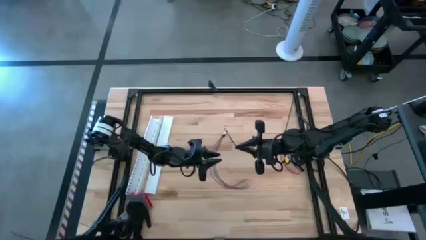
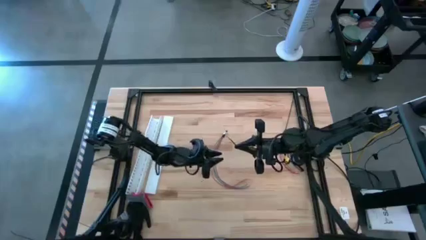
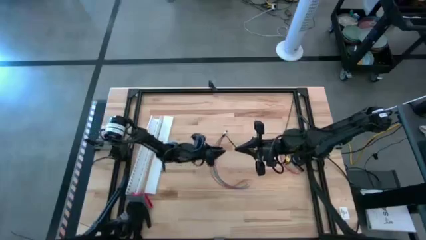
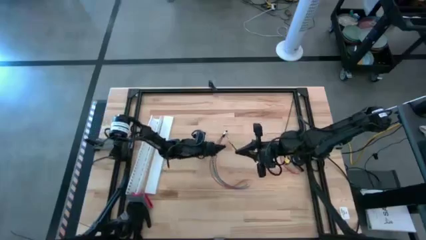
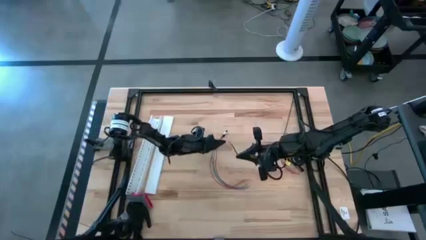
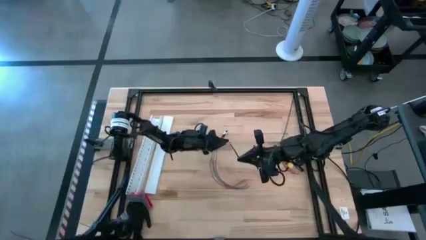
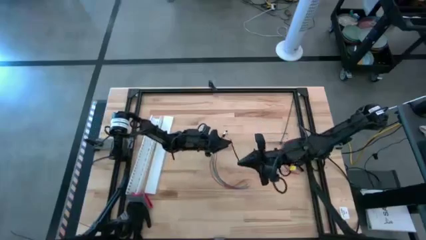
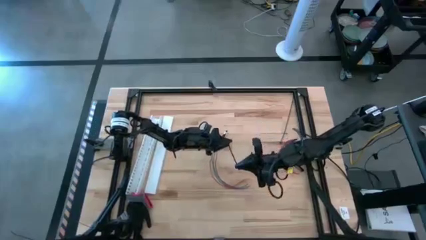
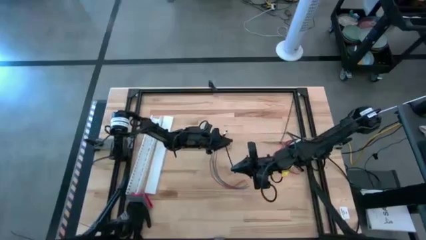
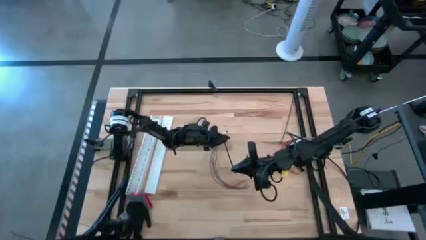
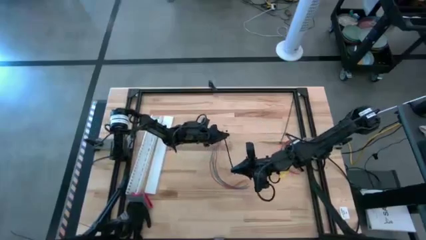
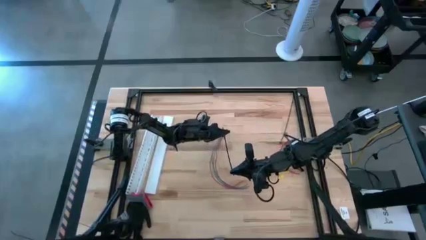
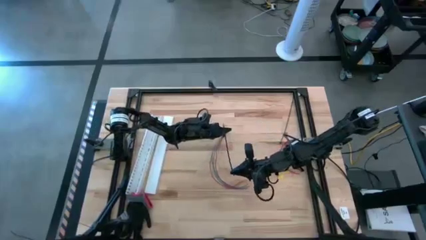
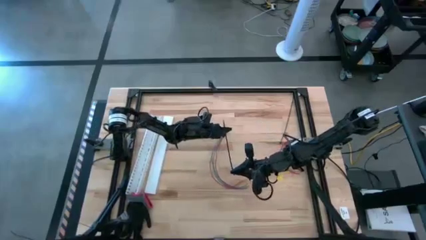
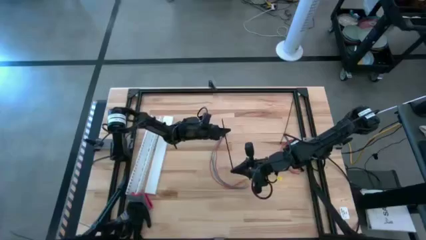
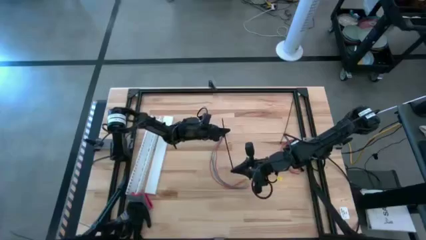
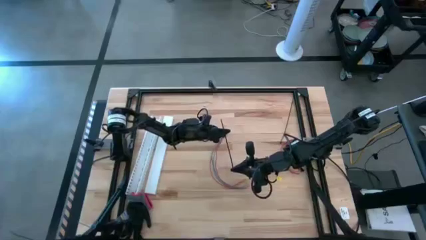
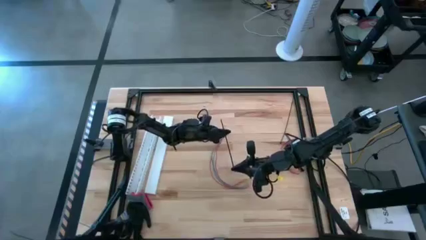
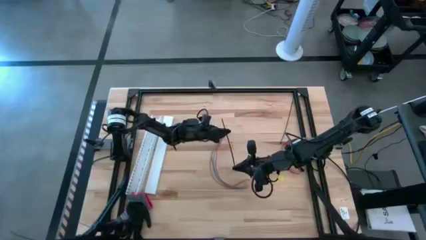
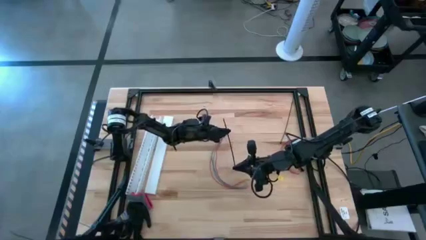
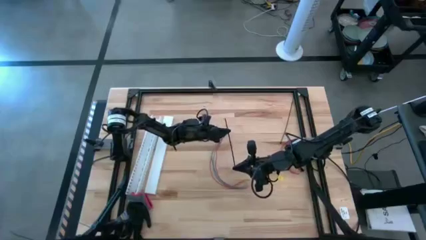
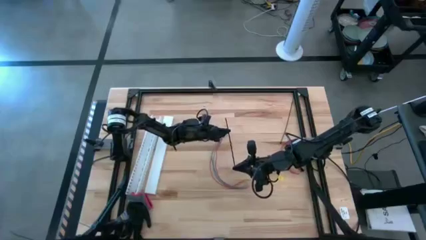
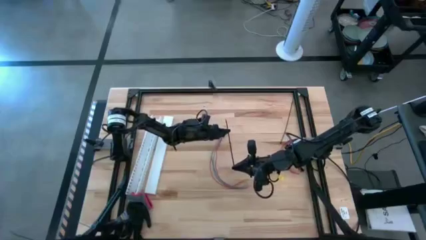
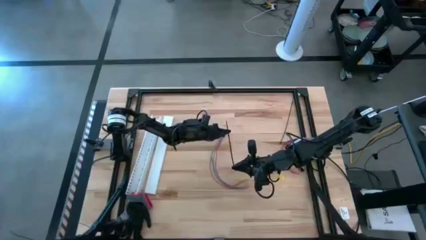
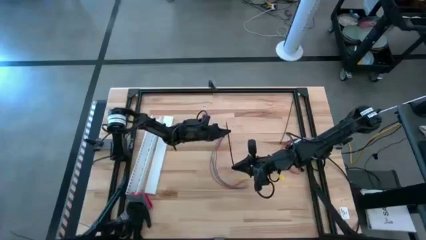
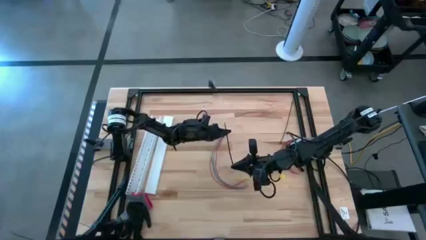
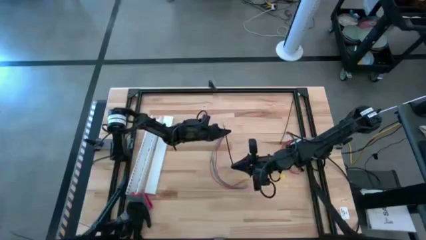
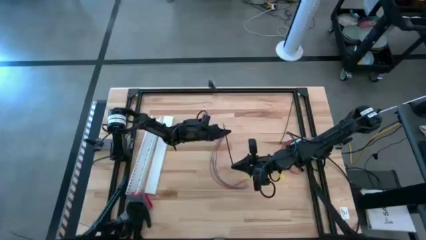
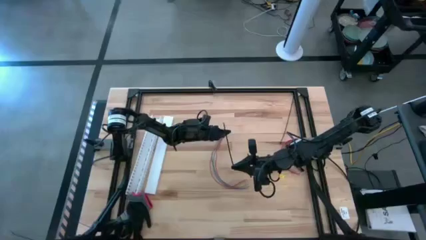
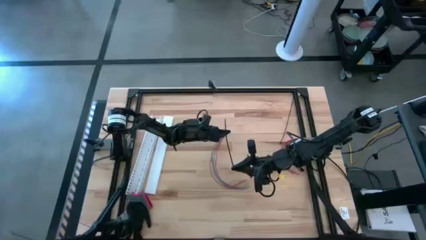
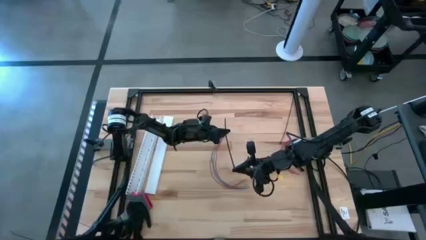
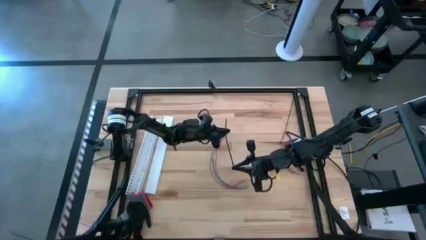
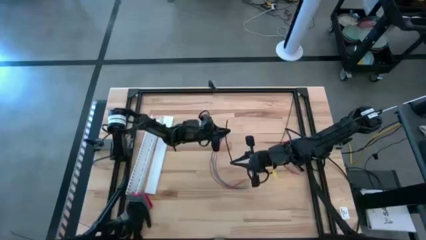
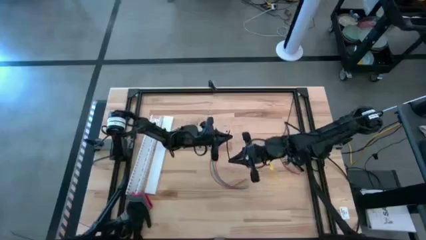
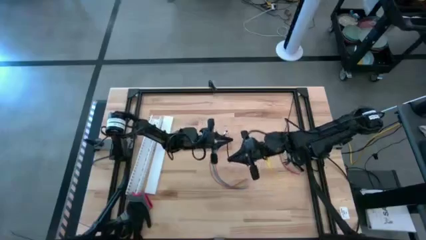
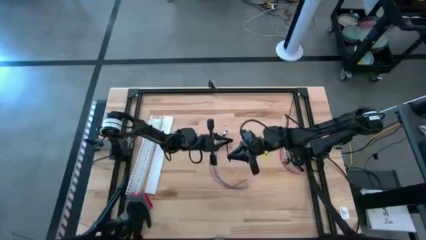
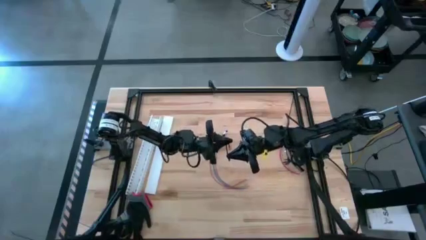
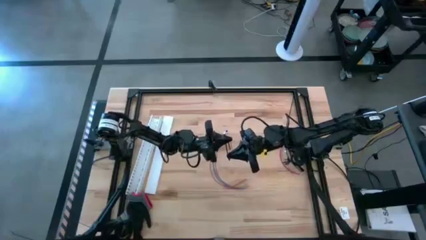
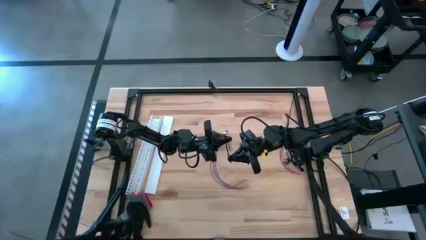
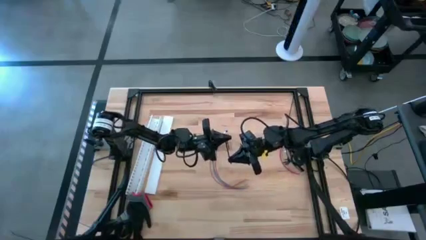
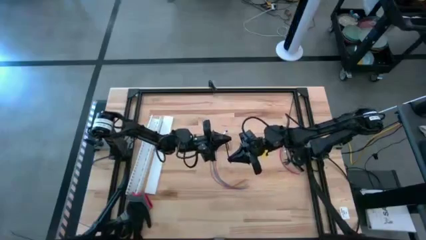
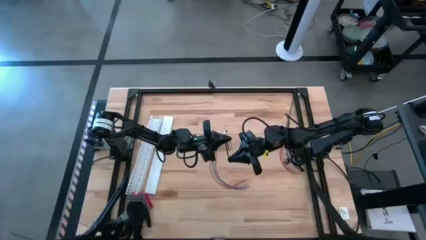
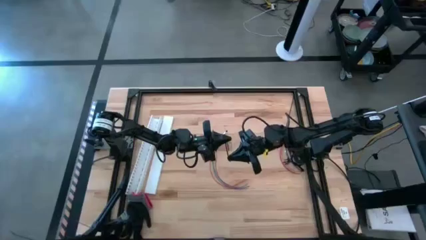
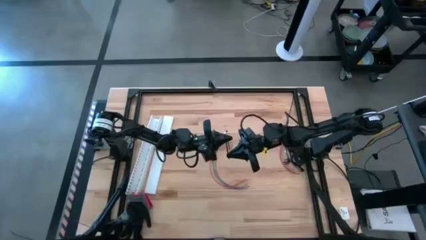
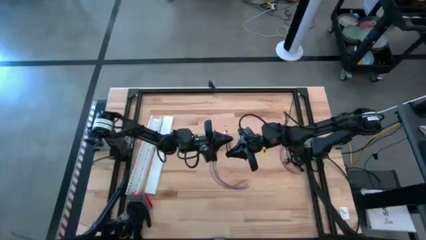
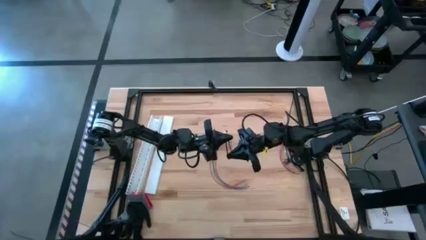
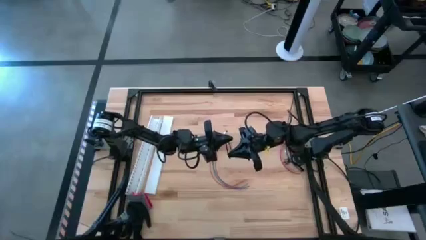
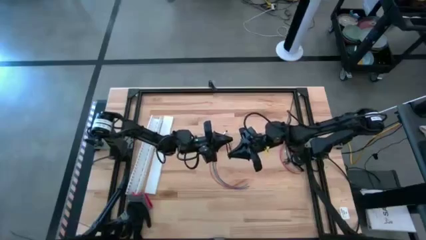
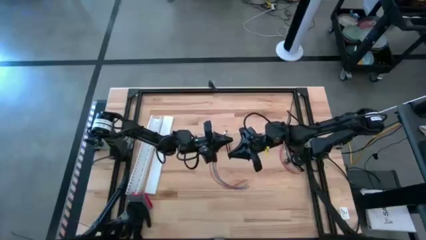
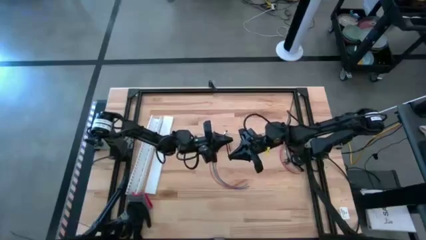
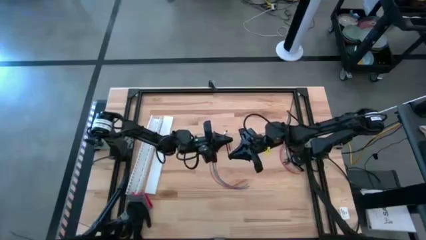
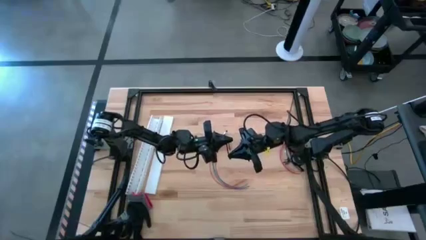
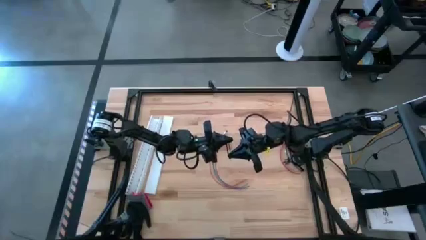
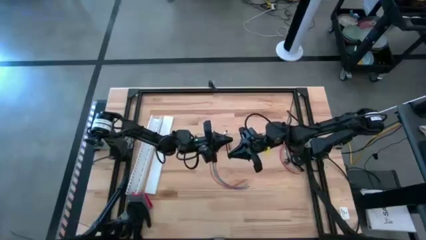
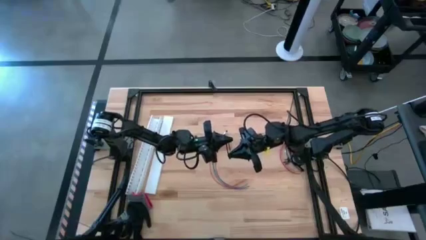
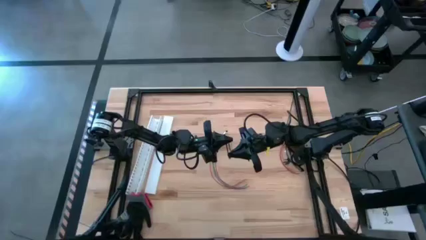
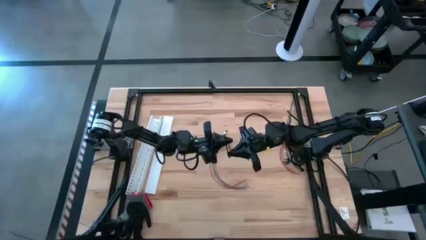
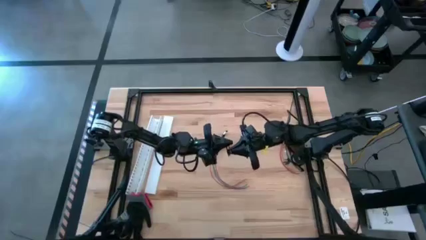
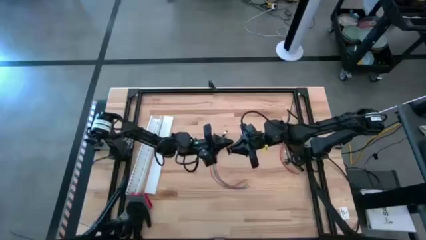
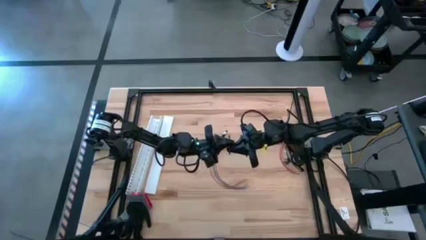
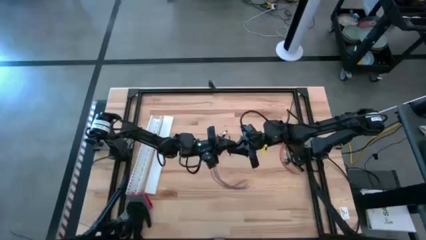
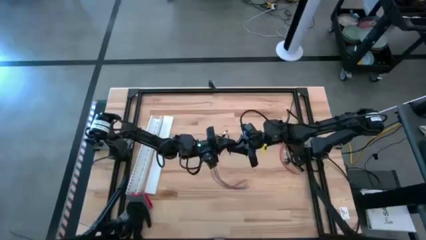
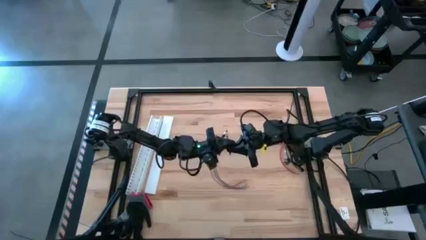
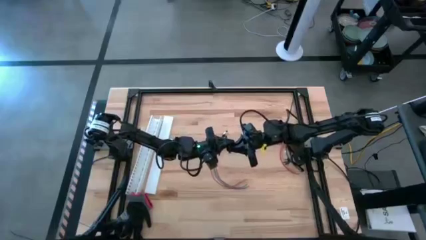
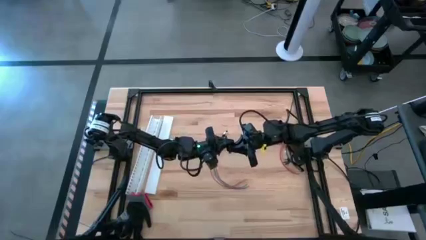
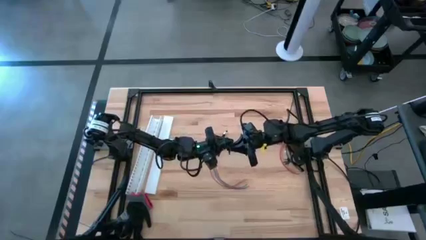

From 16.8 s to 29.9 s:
Task: Ziptie cables
Insert the bottom black ziptie into the black ziptie lock
